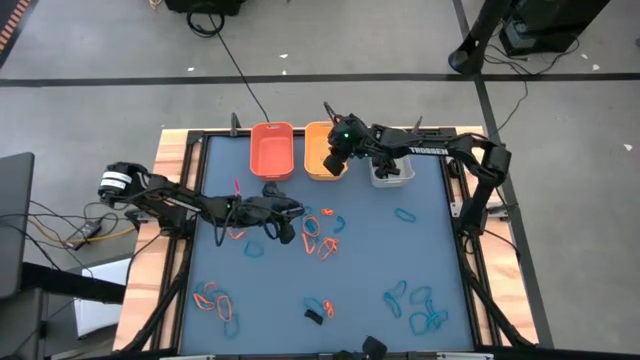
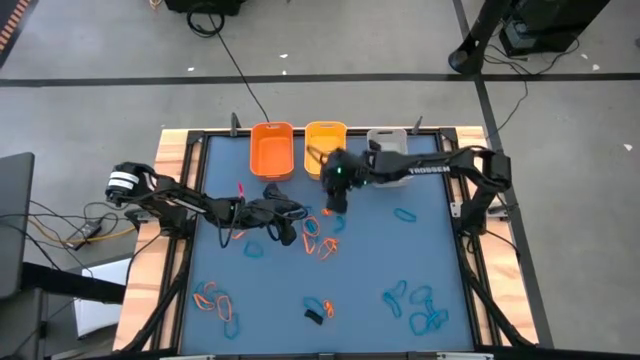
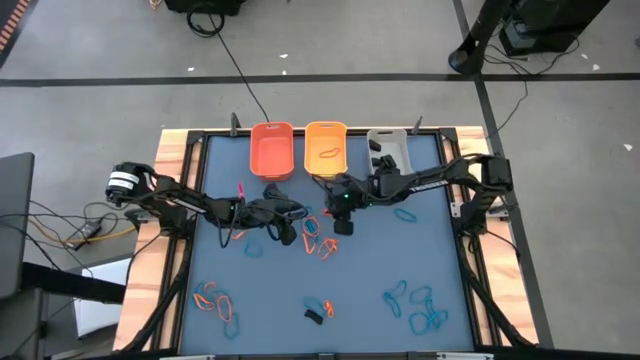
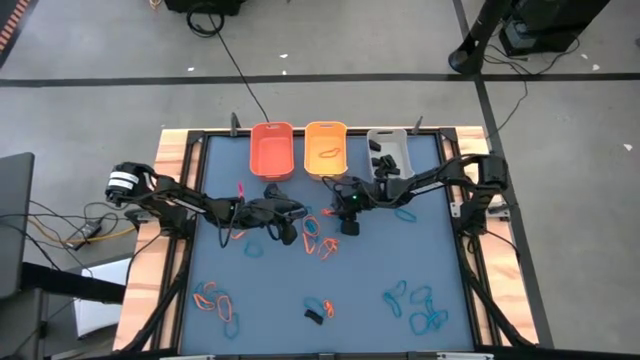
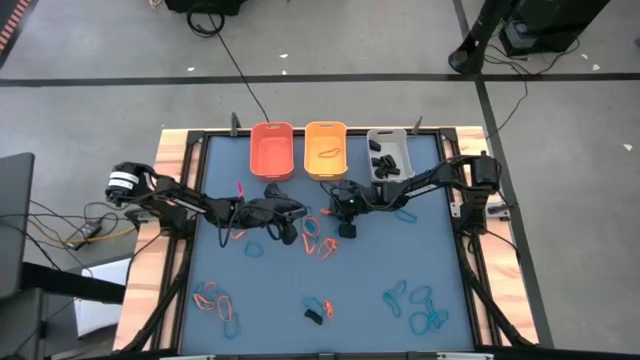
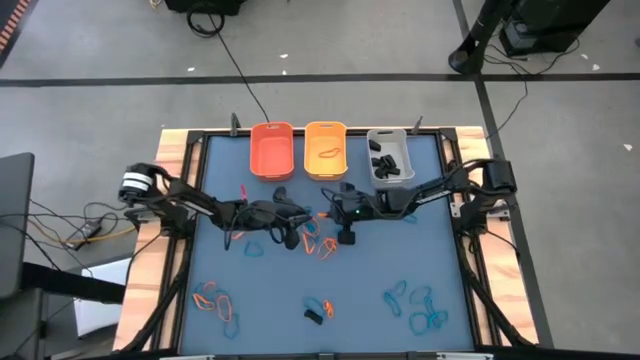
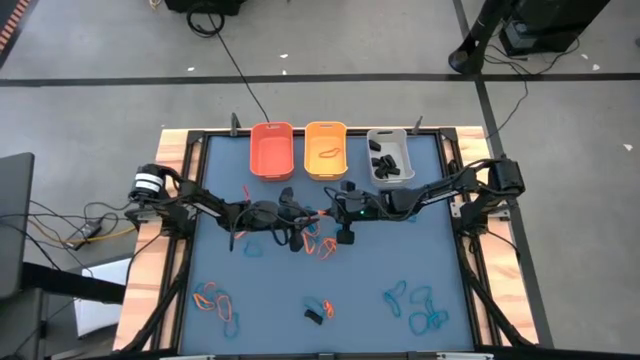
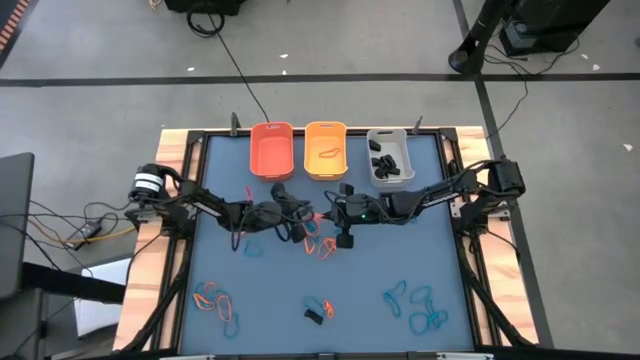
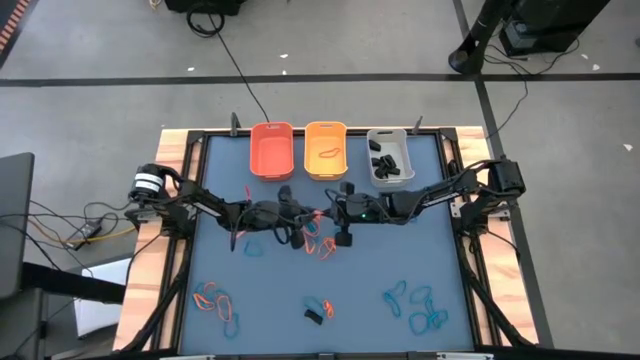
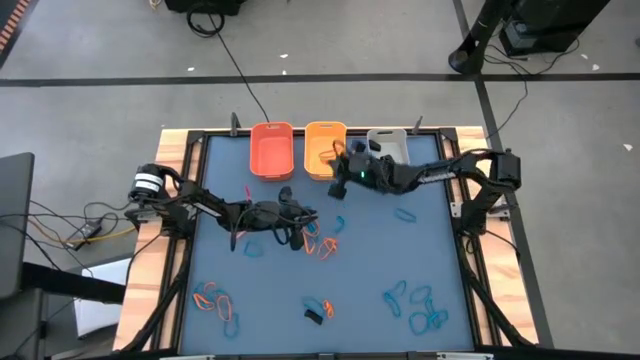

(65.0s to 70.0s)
Task: Sort rubber bands into baskets
Put the orange rubber band into the yellow bin

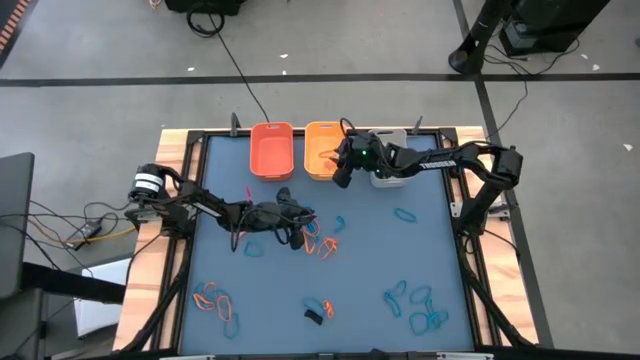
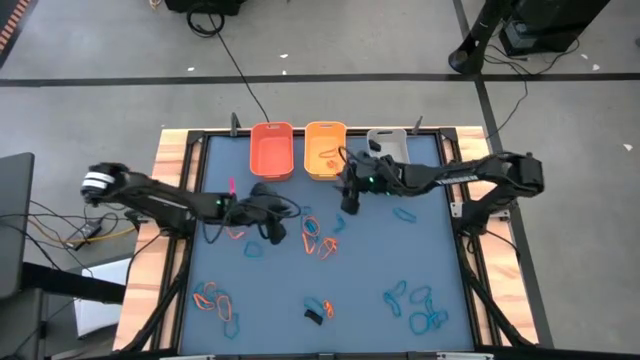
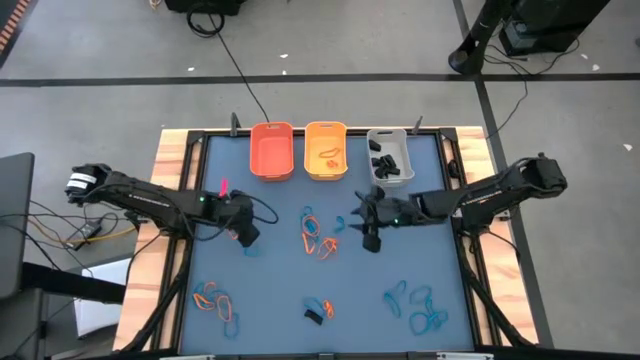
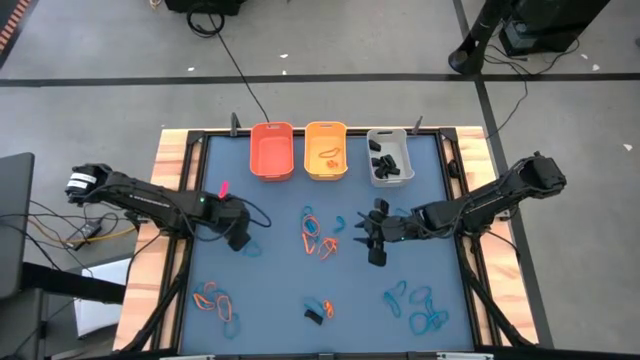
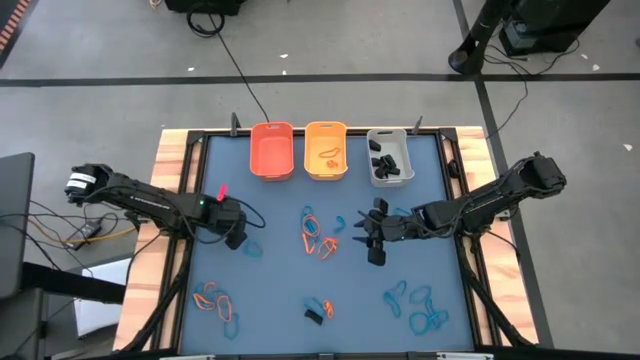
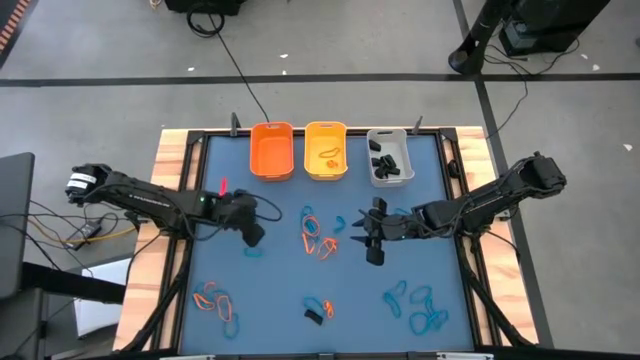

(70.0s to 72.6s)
Put the orange rubber band into the yellow bin

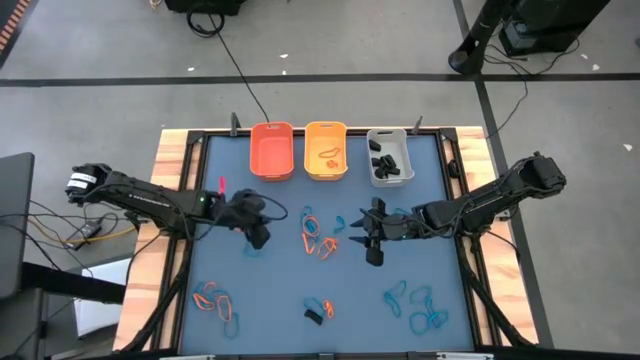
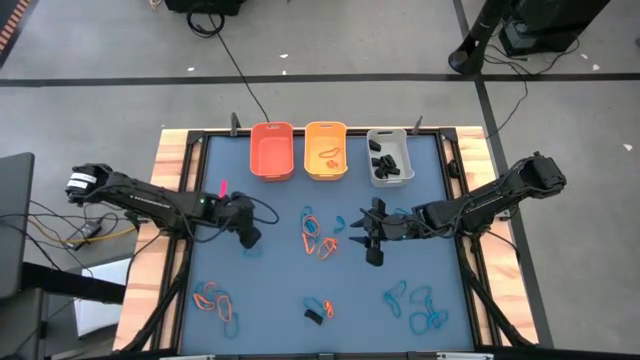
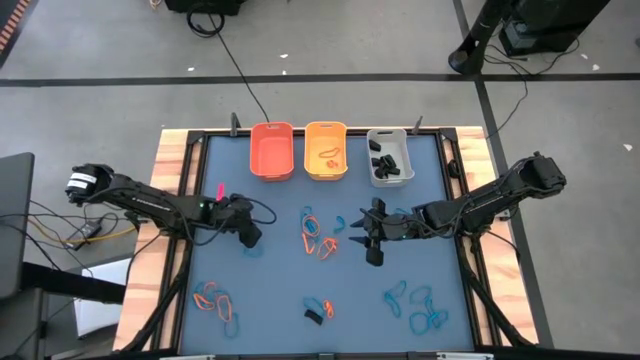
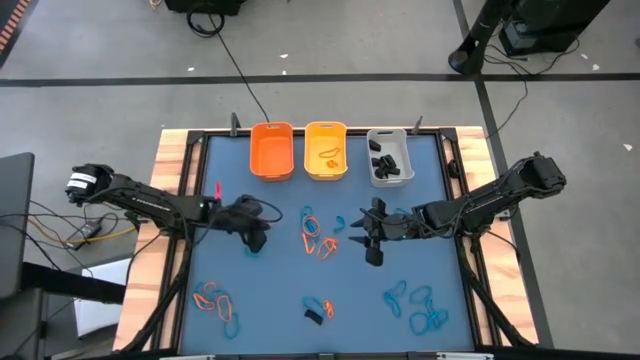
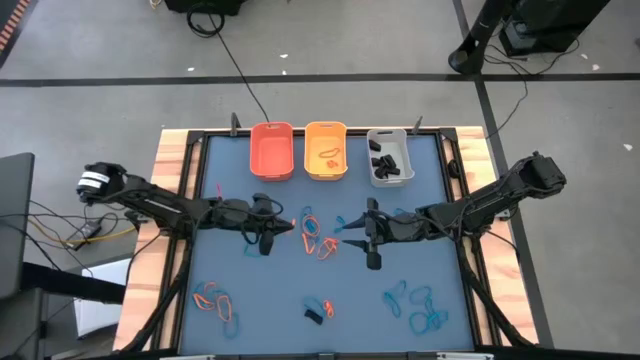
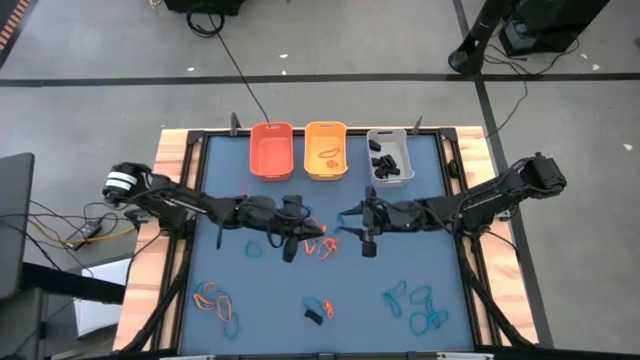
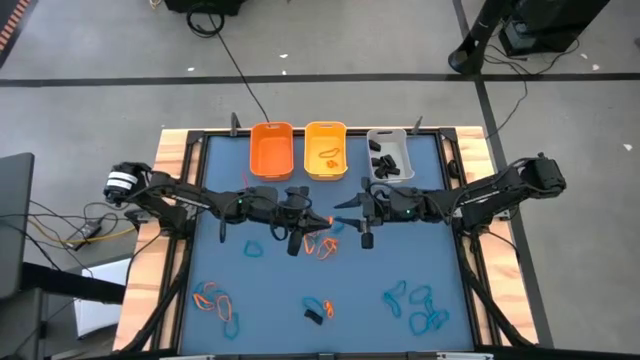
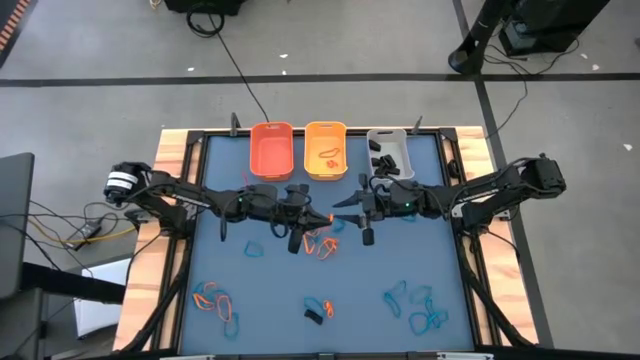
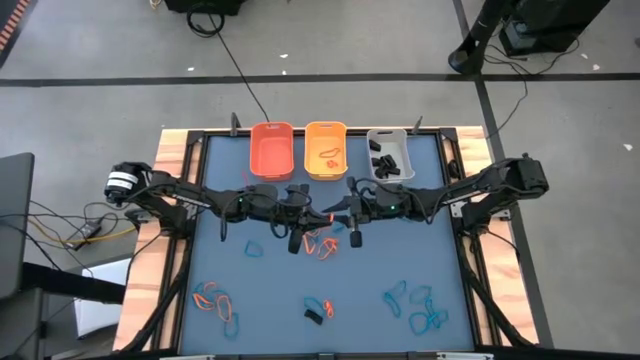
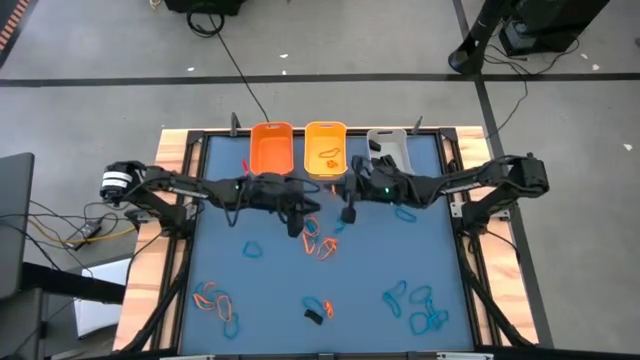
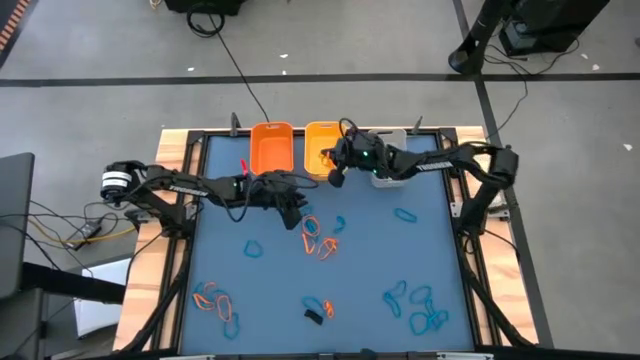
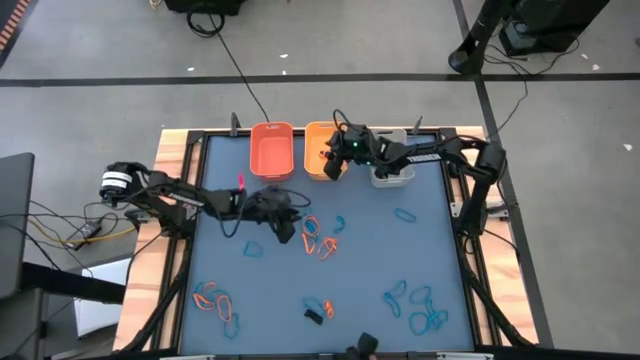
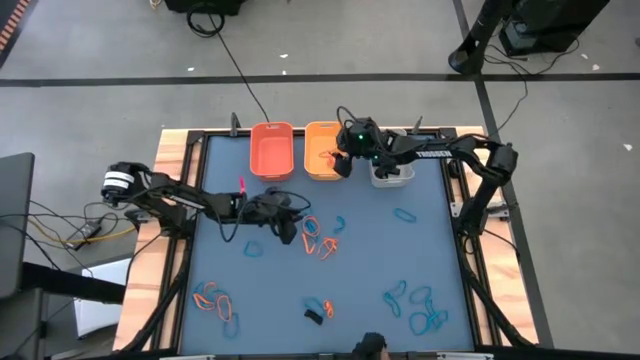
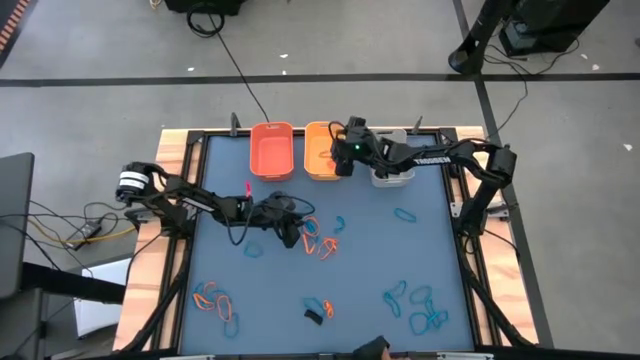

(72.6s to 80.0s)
Put the orange rubber band into the yellow bin

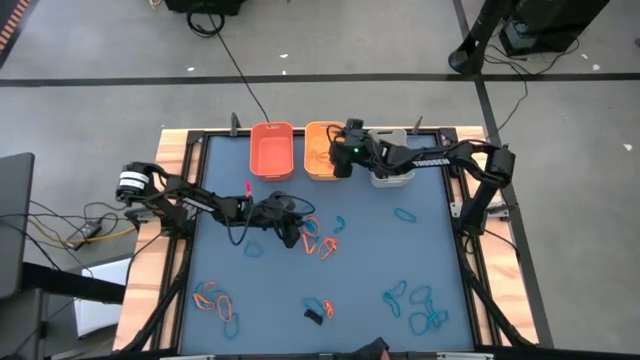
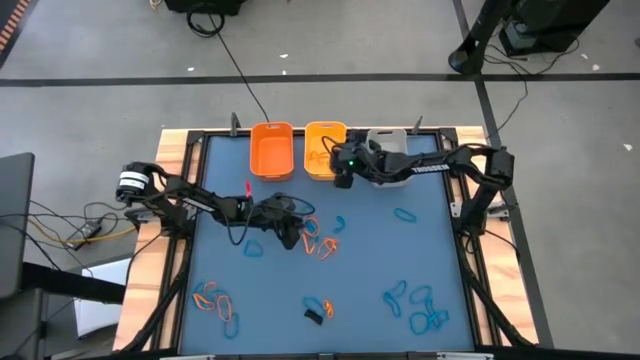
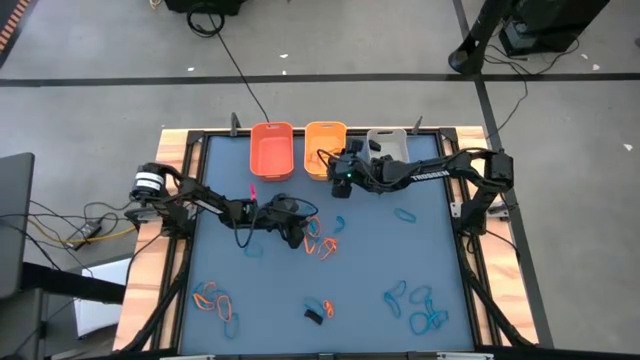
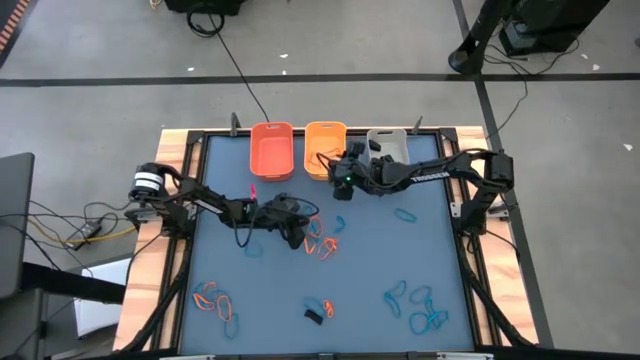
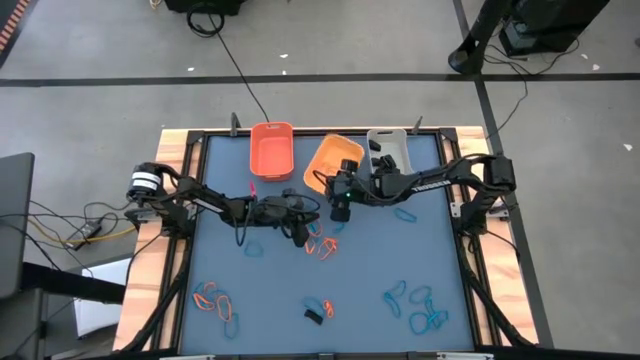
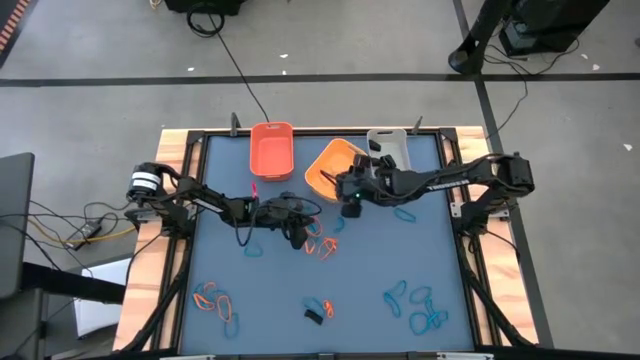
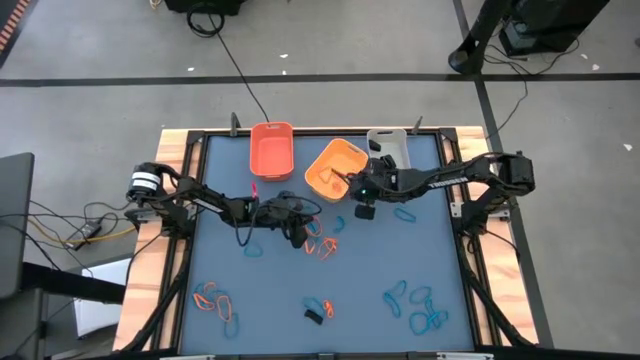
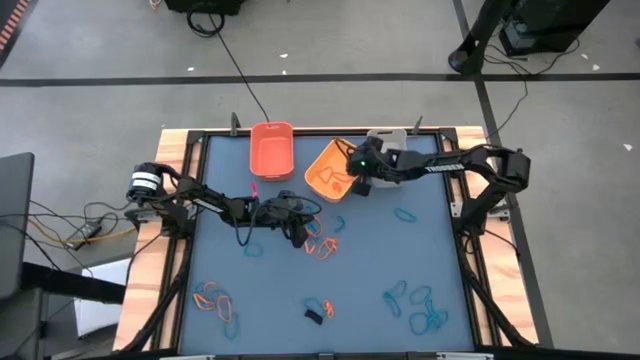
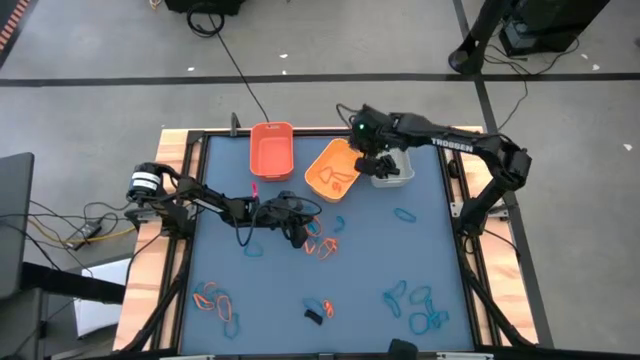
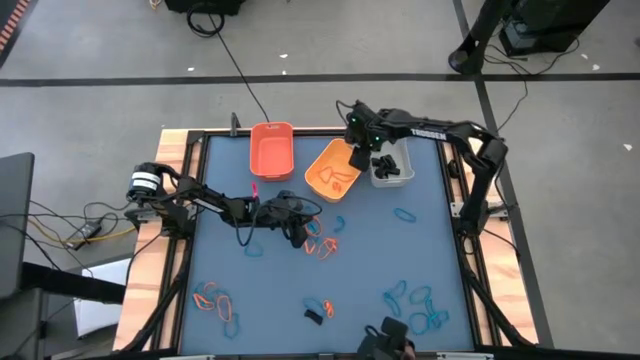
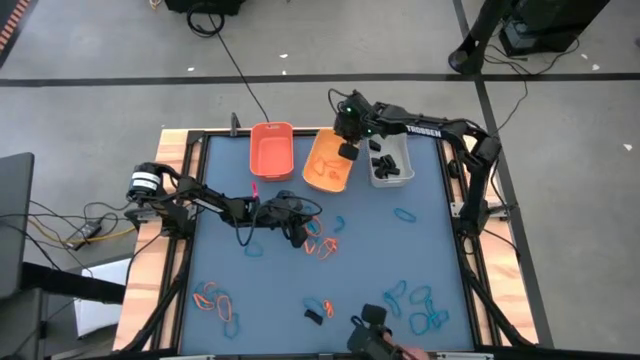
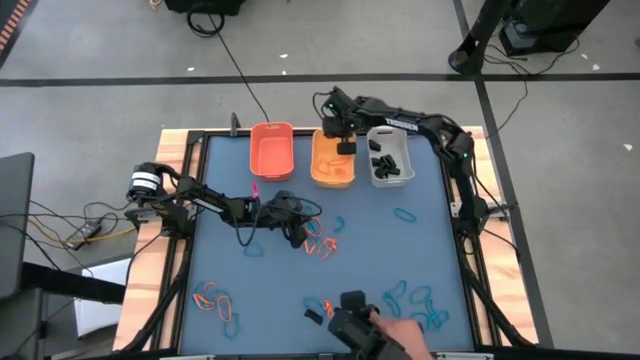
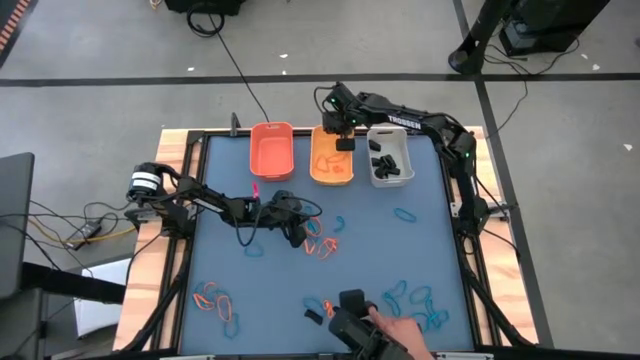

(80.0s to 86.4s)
Adjust the yellow bin

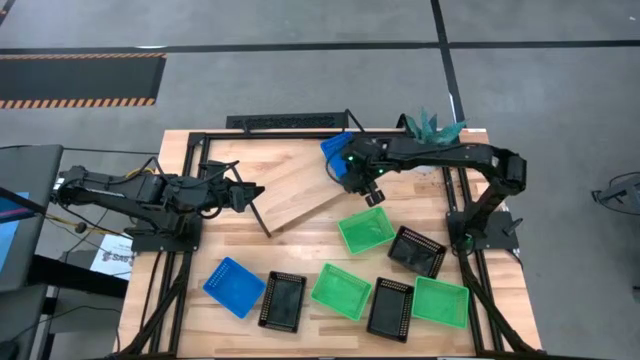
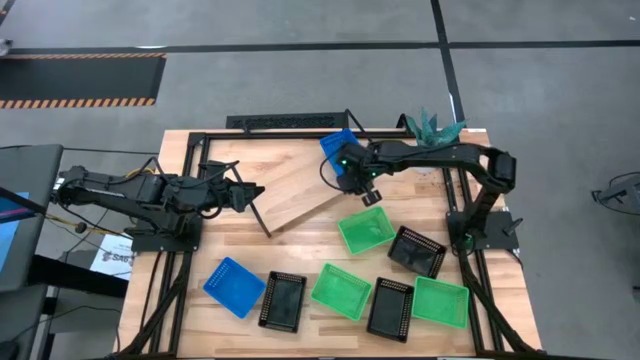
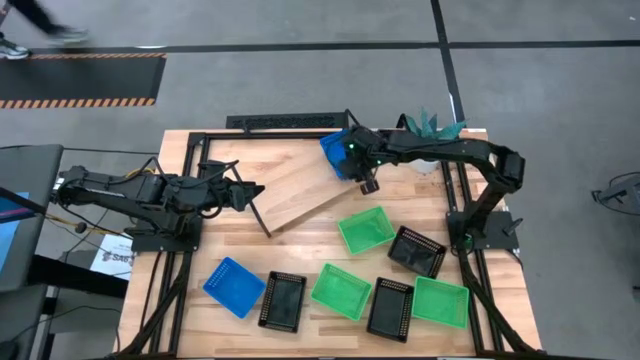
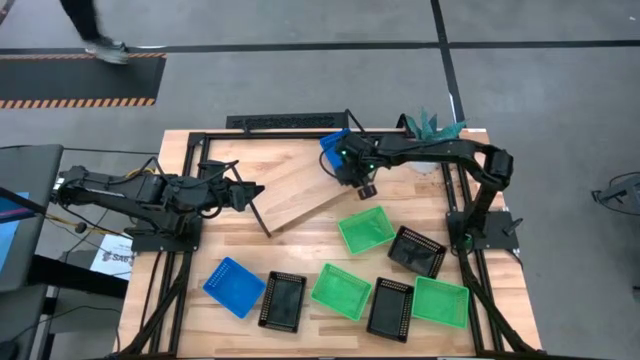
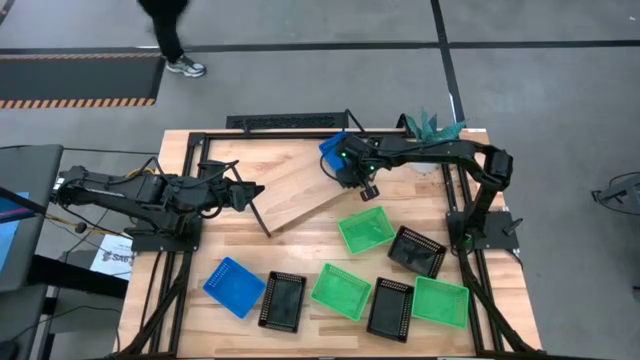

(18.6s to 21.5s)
Task: Stack baskets on shelf by color
Adjust the stacked blue bins
